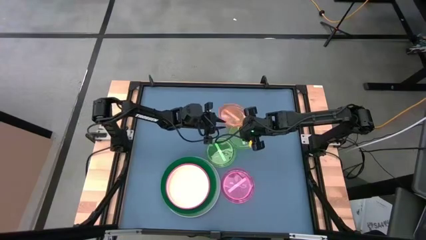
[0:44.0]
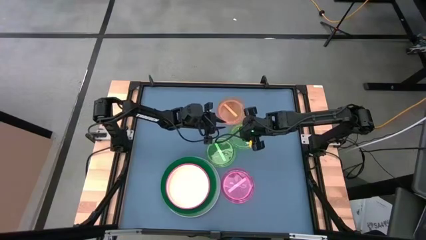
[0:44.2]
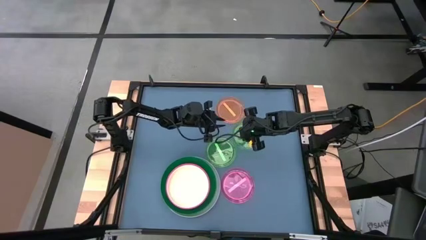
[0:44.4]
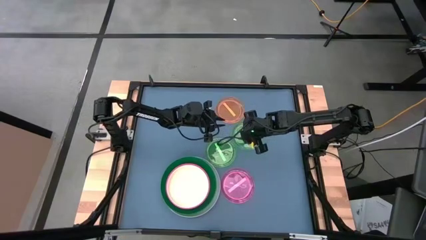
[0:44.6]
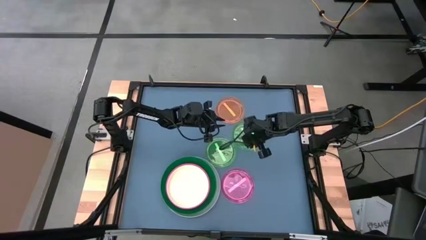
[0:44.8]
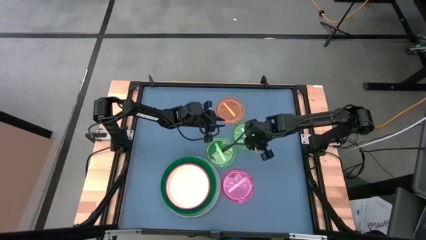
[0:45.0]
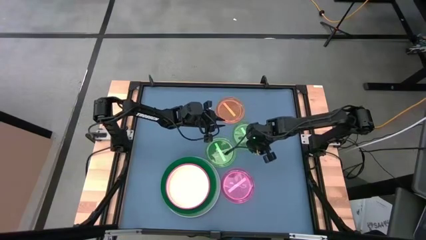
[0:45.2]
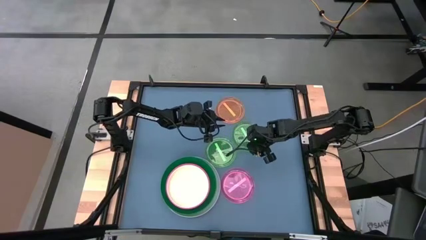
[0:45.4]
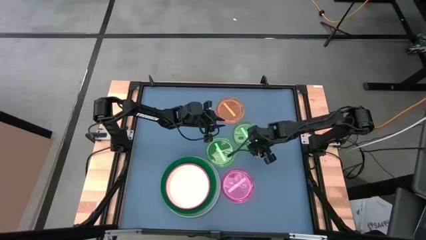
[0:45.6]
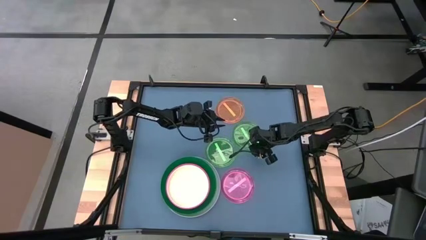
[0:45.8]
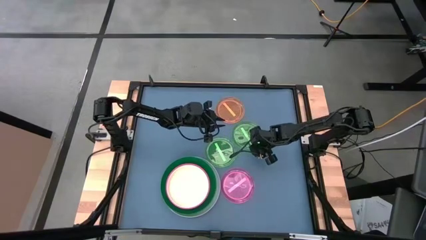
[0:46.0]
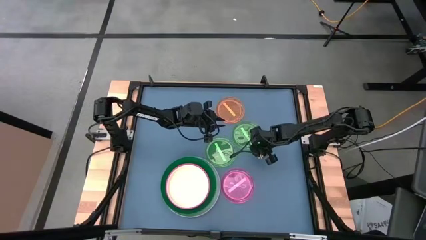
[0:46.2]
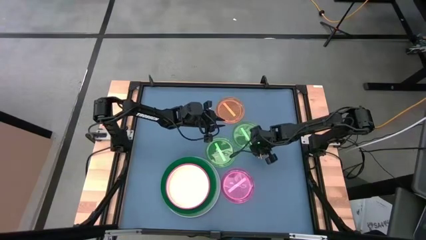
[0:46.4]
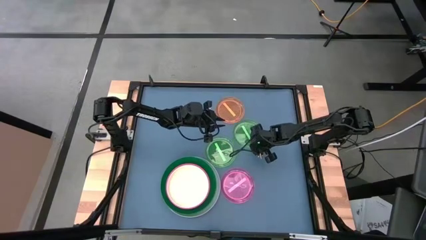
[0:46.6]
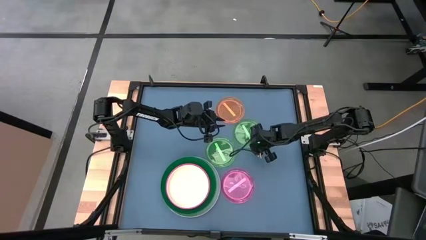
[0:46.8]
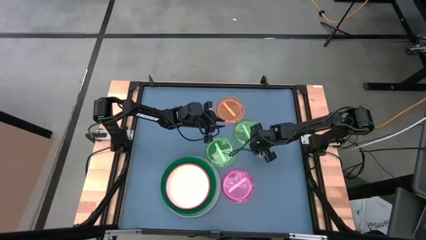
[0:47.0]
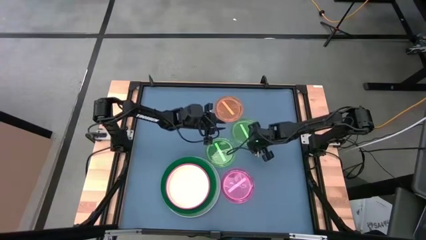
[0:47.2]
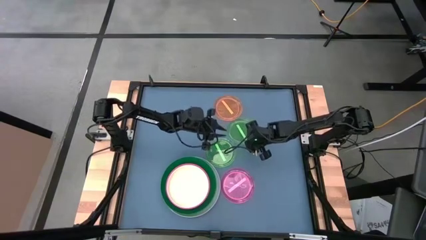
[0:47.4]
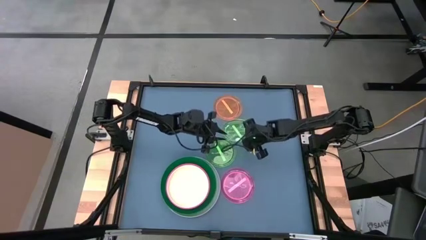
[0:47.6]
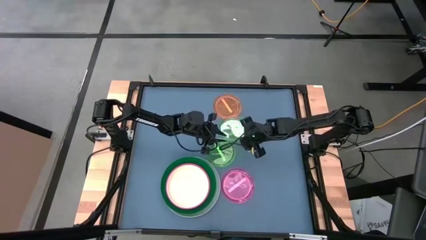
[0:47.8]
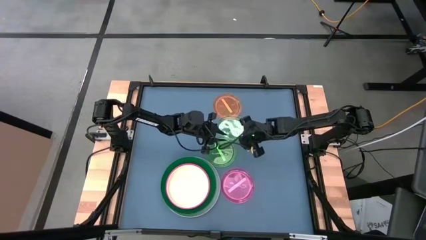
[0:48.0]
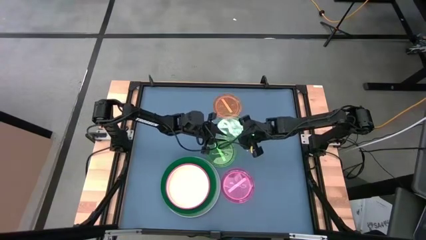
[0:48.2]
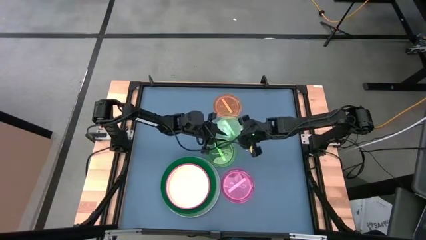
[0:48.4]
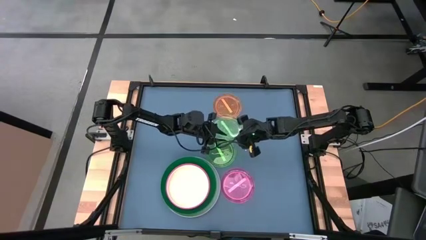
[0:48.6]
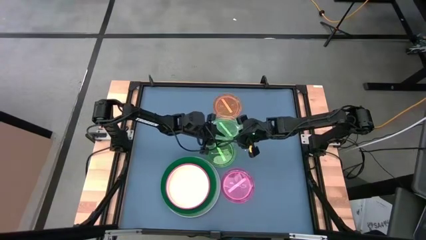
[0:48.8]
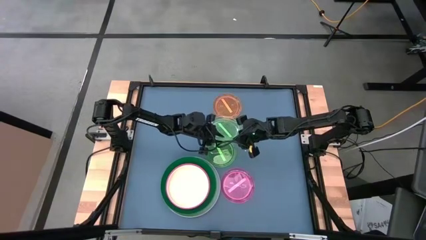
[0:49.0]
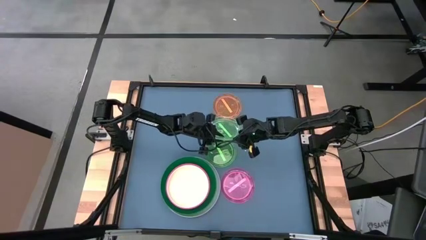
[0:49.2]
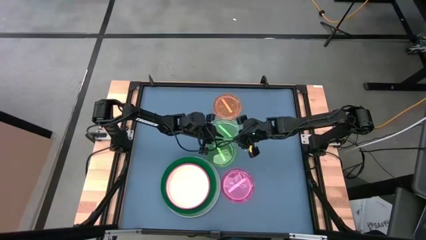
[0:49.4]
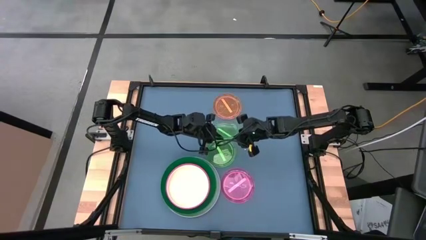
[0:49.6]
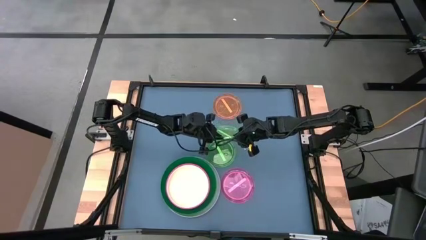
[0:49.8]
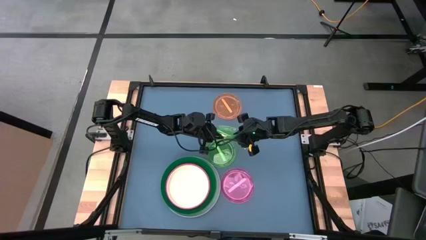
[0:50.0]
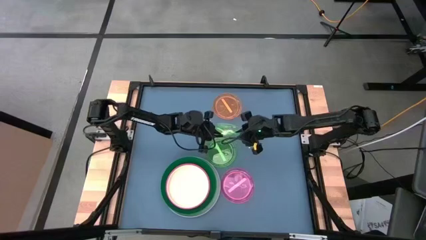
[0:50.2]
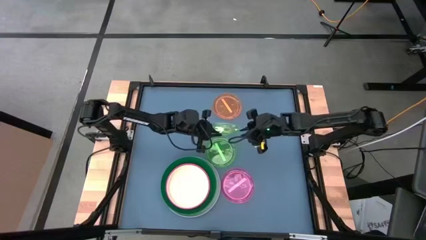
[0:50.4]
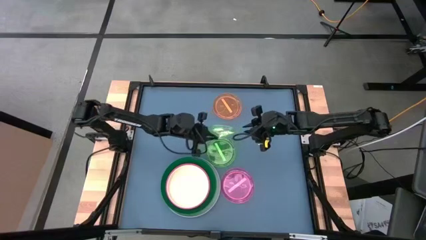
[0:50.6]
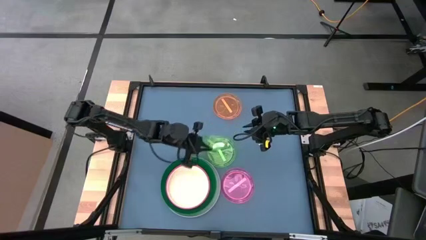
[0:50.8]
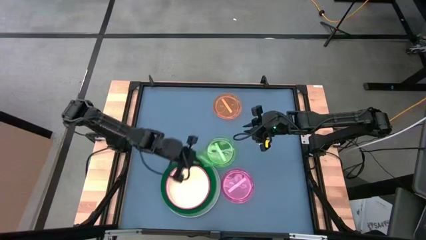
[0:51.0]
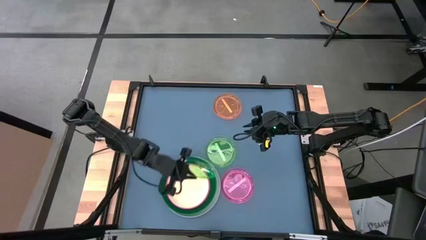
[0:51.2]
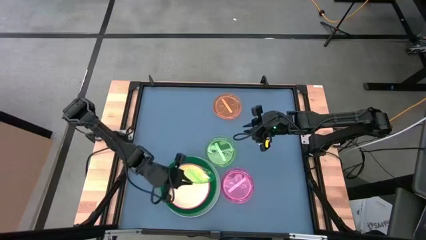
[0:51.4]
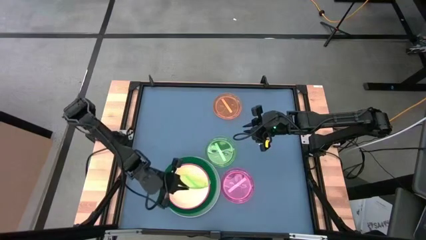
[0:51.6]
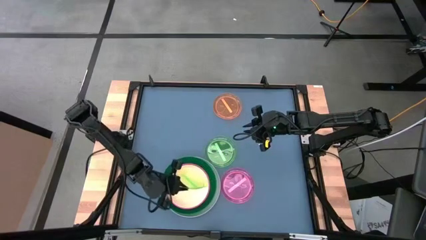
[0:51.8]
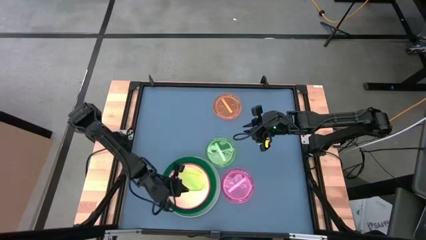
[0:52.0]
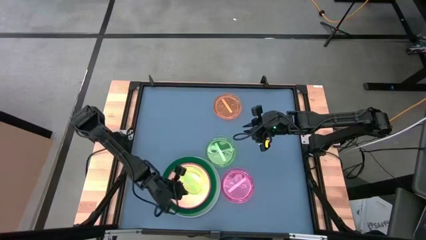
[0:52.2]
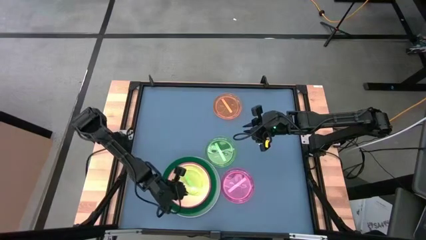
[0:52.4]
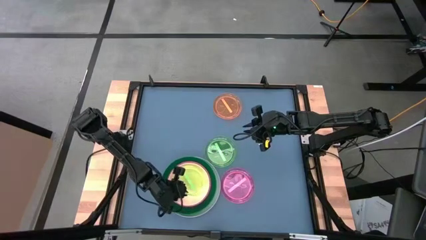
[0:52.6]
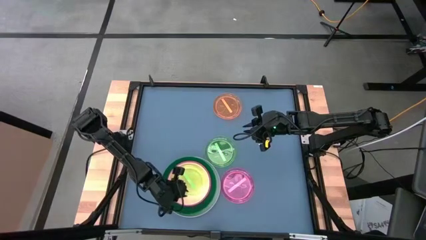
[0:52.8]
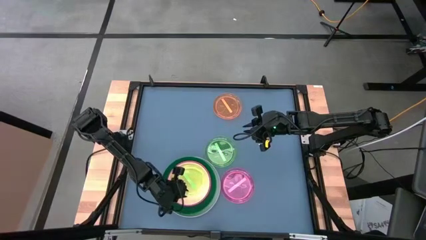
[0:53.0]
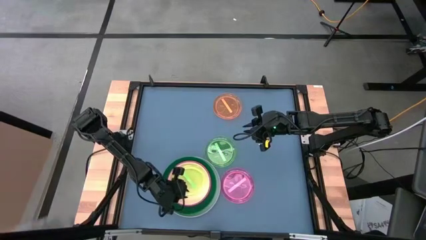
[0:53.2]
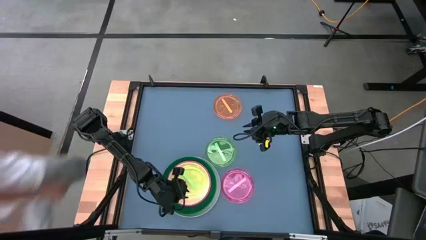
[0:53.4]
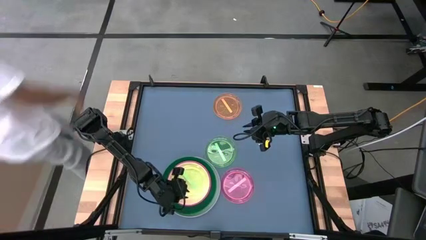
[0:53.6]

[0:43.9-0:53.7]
Task: Stack plastic plates
Stack the right light green plate on top of the light orange plate

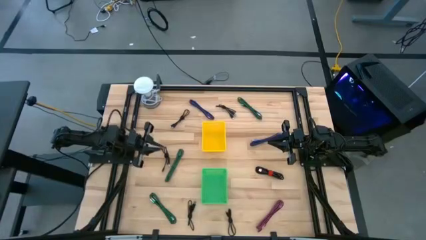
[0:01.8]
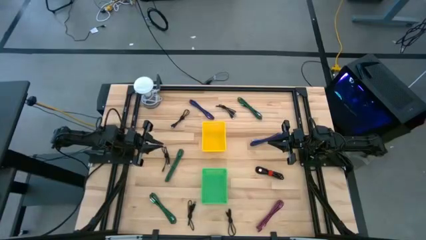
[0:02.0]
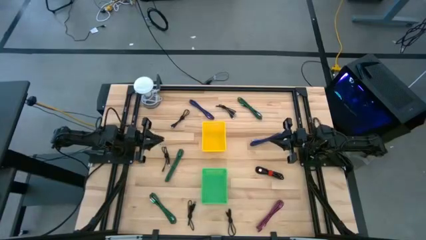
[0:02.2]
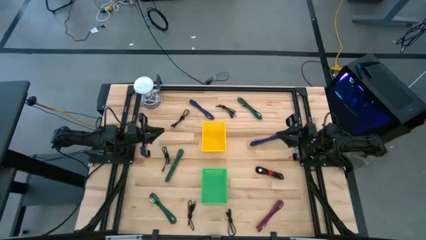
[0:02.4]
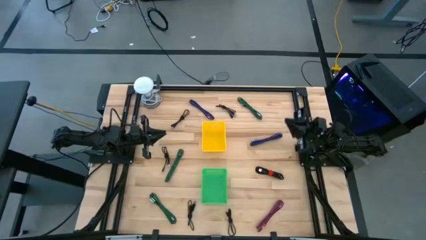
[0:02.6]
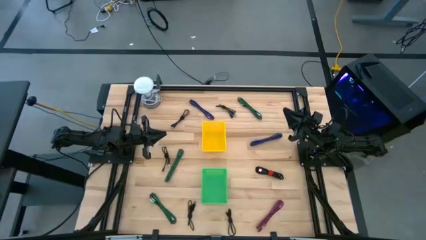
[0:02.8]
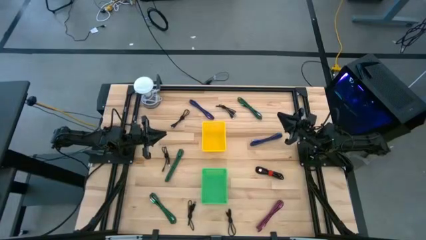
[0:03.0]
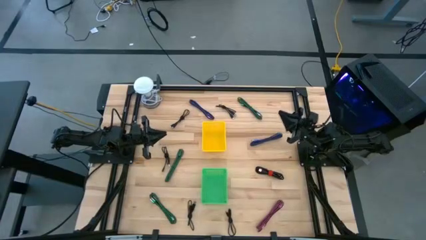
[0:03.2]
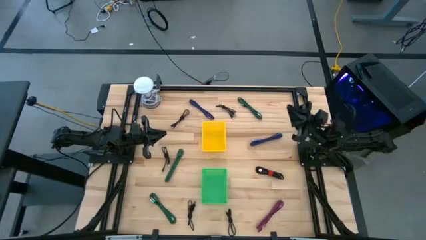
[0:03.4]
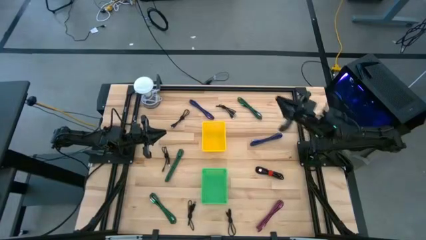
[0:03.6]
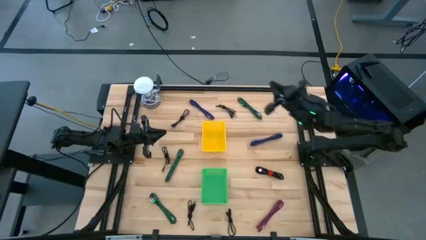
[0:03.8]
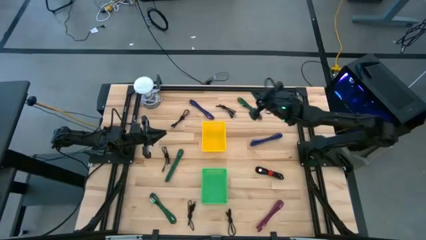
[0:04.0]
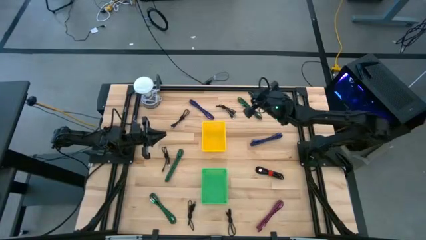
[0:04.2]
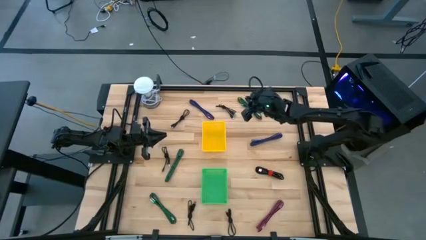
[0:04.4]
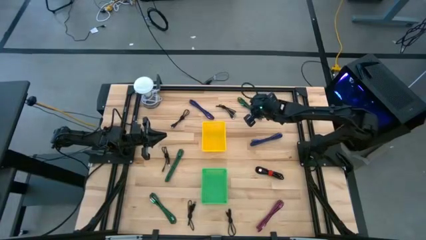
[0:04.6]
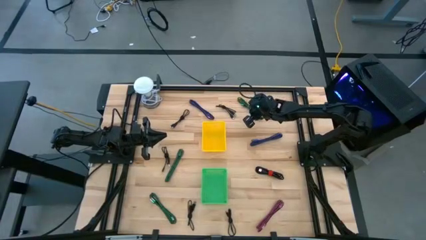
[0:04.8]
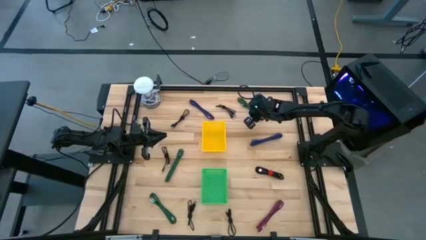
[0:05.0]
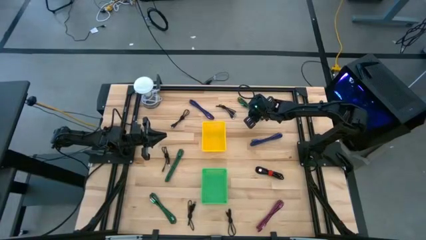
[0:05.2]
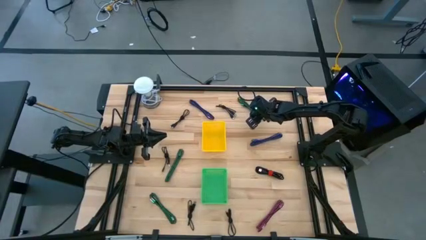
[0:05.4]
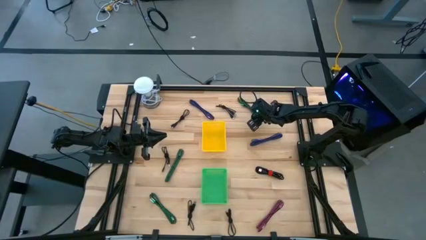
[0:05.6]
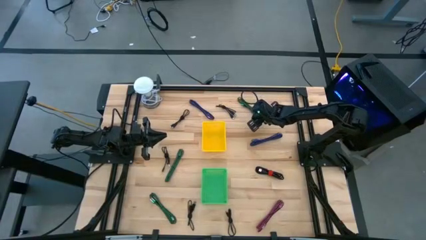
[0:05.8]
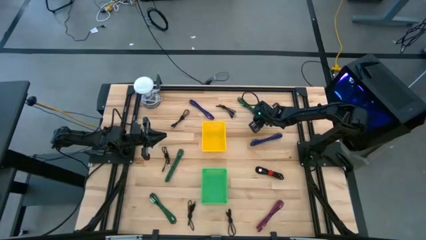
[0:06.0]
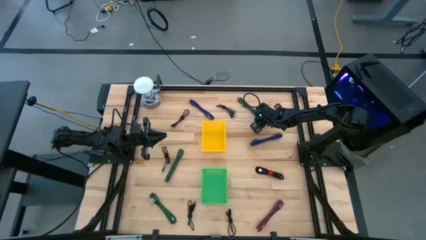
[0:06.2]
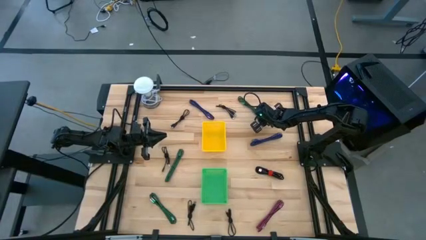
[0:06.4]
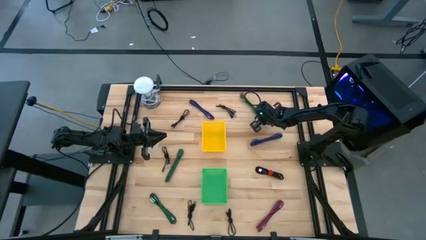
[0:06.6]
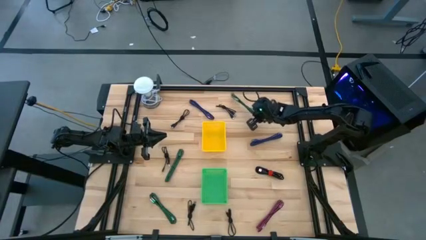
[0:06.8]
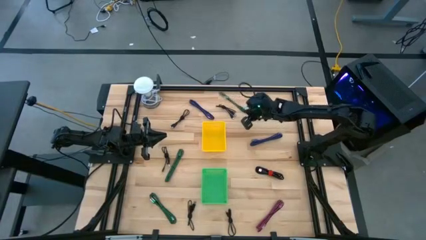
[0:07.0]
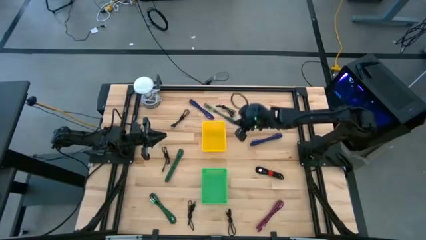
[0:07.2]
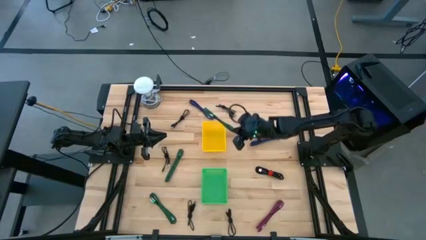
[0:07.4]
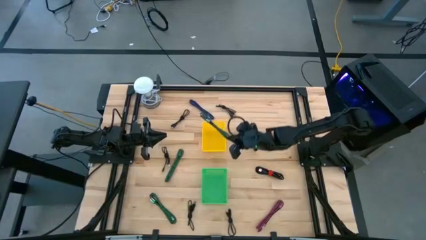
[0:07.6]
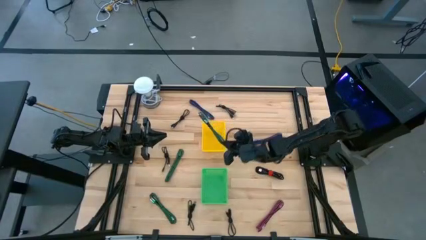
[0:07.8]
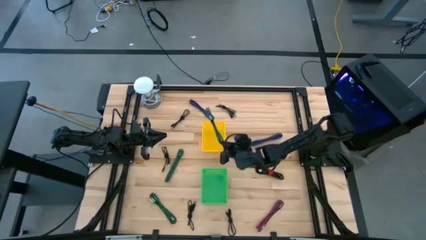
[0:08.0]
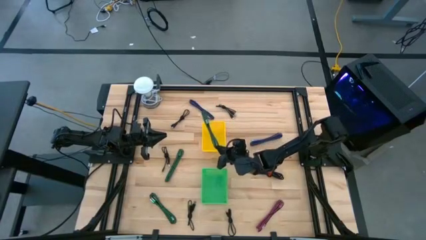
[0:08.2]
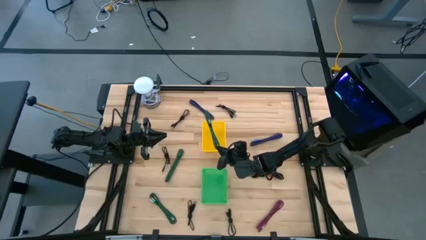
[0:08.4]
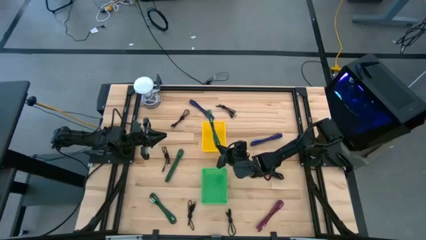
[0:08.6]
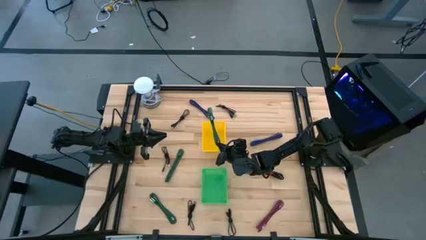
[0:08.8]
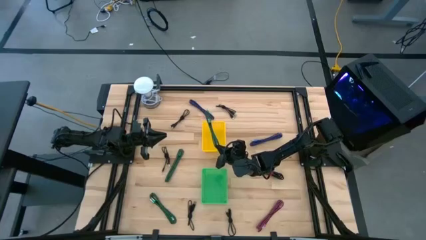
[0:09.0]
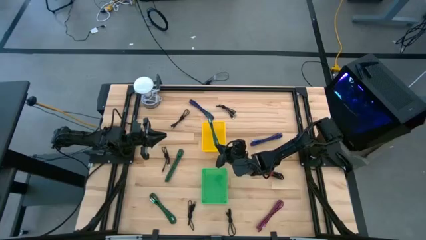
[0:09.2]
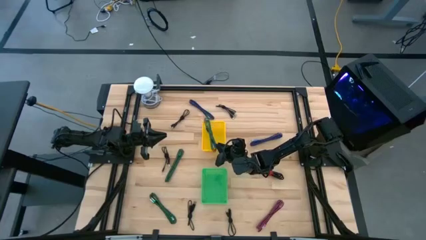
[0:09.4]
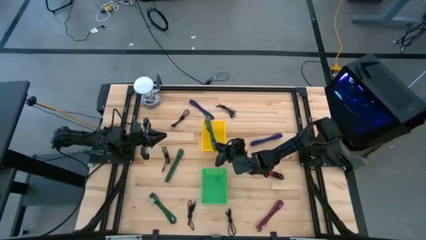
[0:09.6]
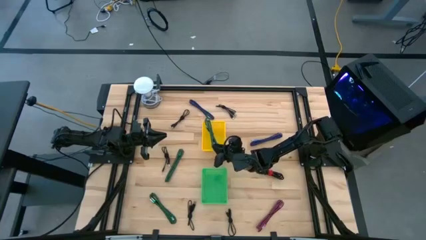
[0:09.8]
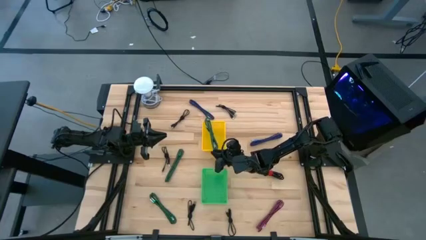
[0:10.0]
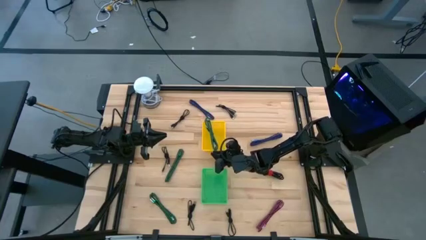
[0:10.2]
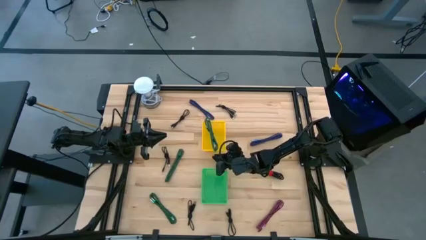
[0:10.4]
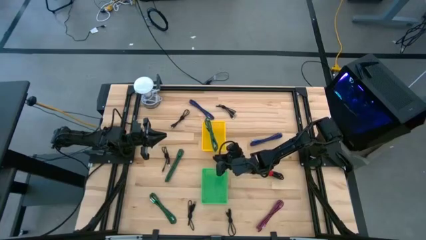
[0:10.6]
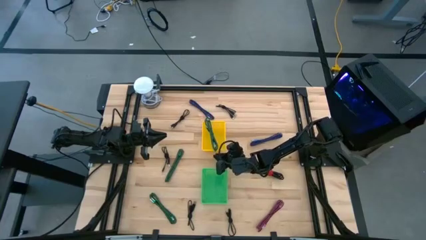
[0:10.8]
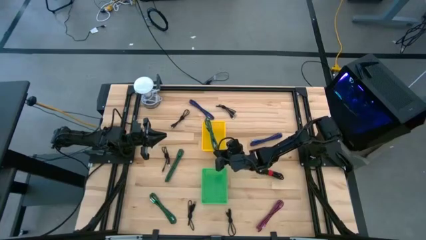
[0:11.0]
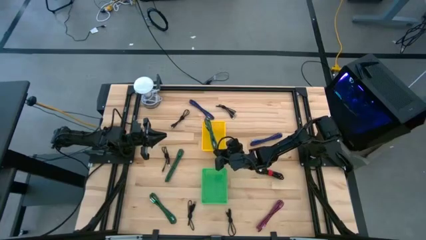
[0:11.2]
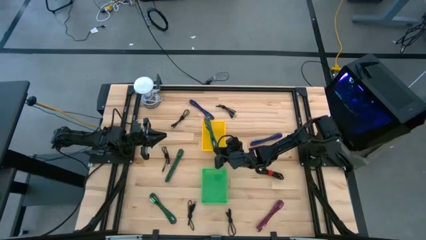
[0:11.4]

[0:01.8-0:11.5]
Task: Pick & Place USB Port
Put the black and green charger cable into the yellow bin
